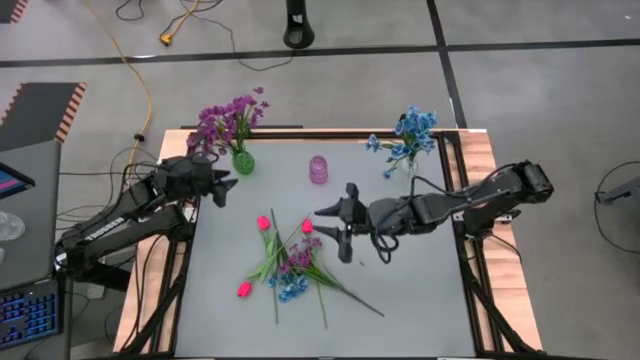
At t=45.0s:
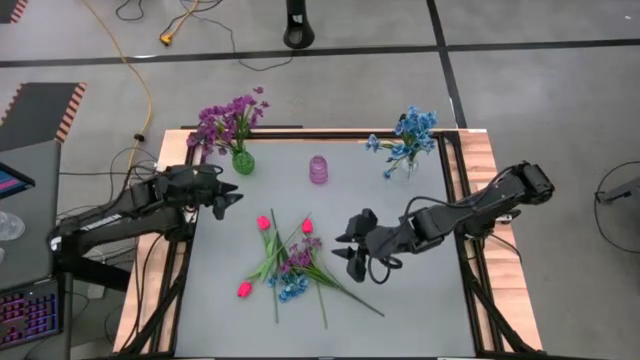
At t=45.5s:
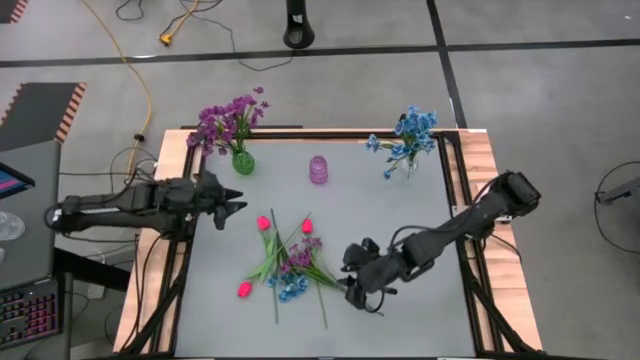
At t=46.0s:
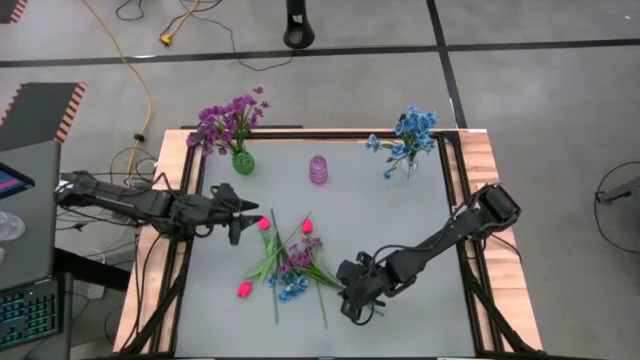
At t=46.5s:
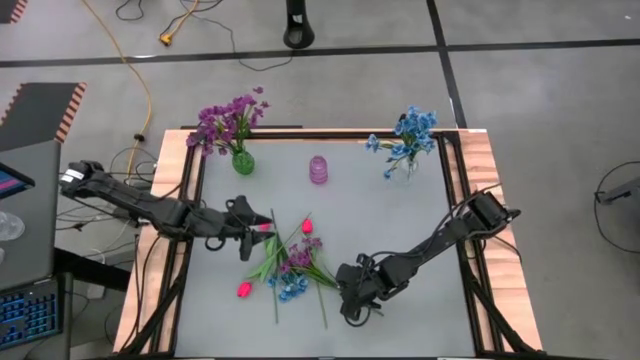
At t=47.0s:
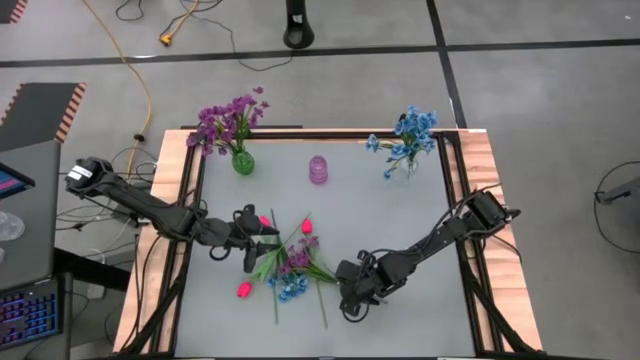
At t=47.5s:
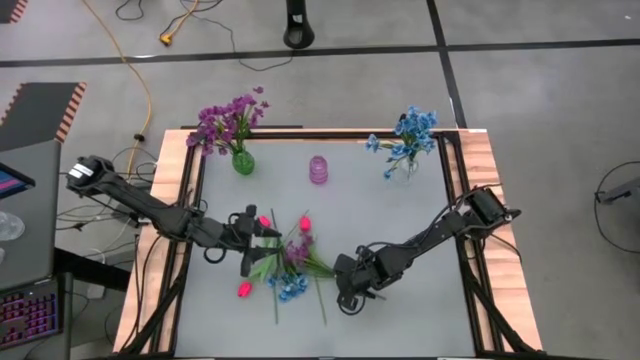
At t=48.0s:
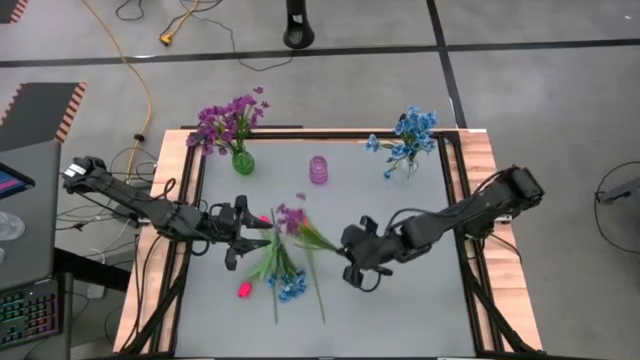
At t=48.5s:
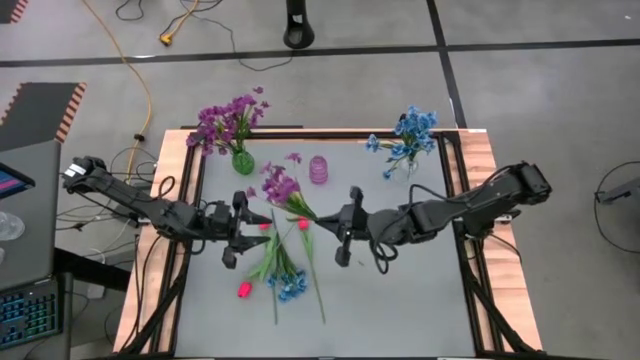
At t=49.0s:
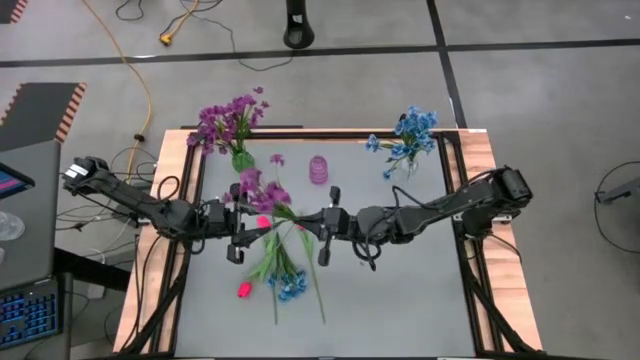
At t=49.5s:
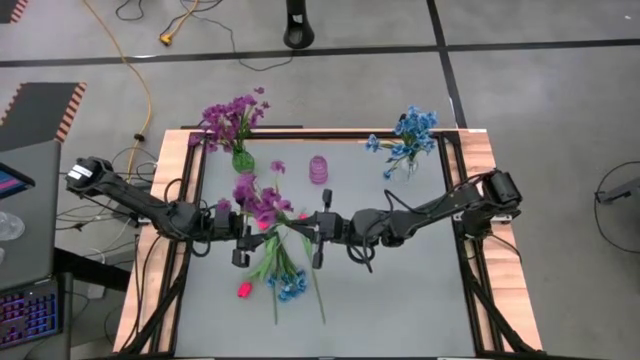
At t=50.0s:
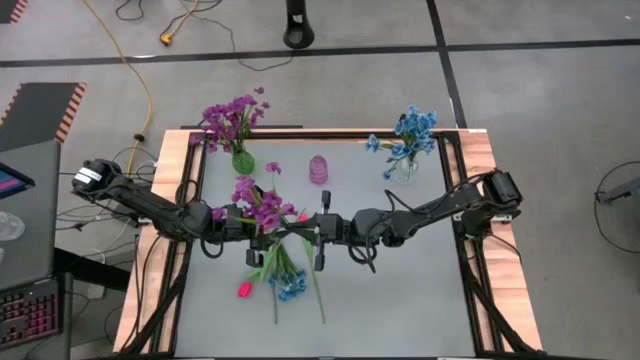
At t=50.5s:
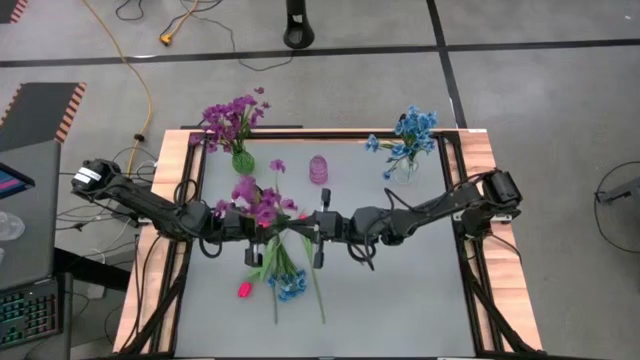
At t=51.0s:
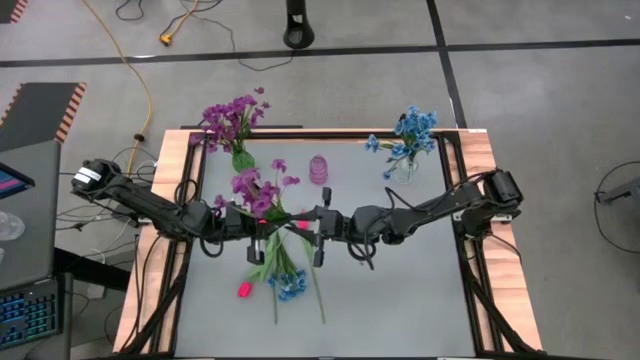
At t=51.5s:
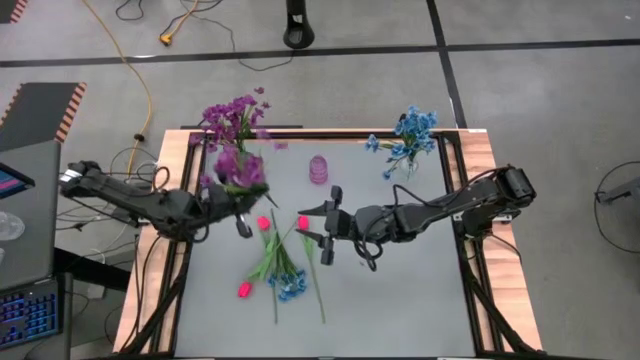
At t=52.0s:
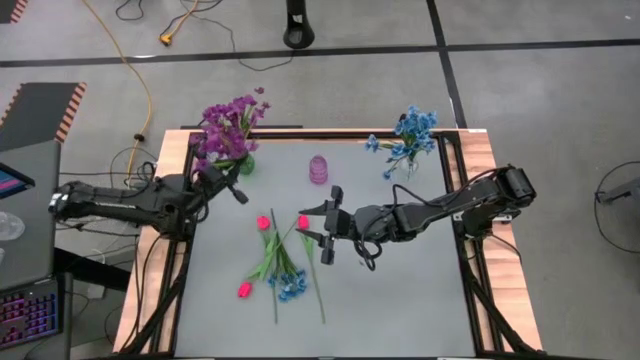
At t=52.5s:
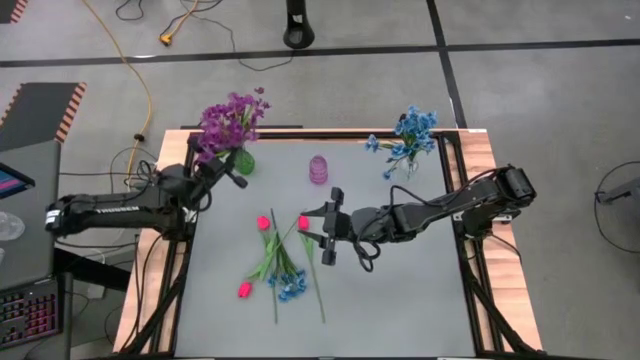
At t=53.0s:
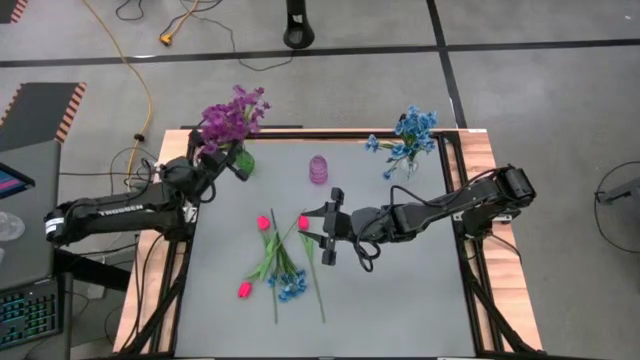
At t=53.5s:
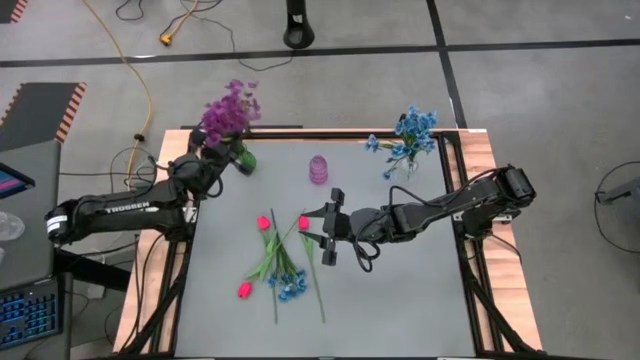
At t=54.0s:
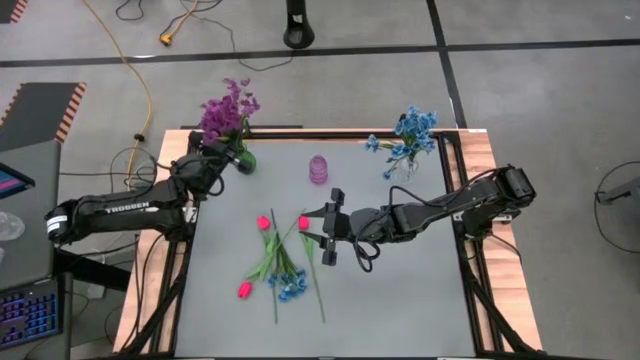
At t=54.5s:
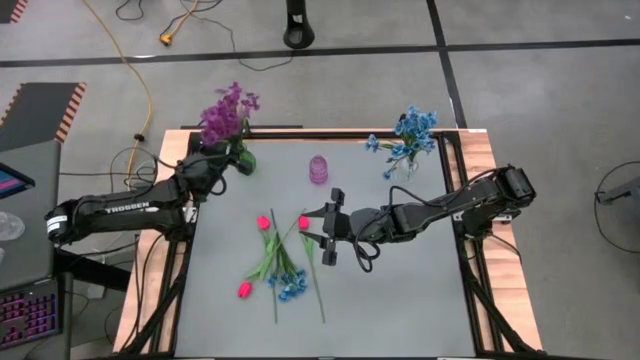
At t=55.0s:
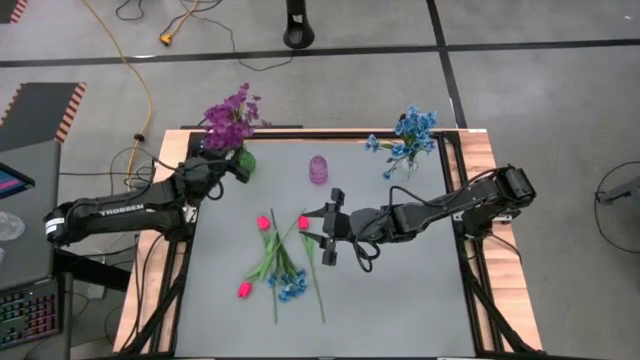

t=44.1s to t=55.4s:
Task: Sort flowers into vase by color
Put the purple flowers into the green vase

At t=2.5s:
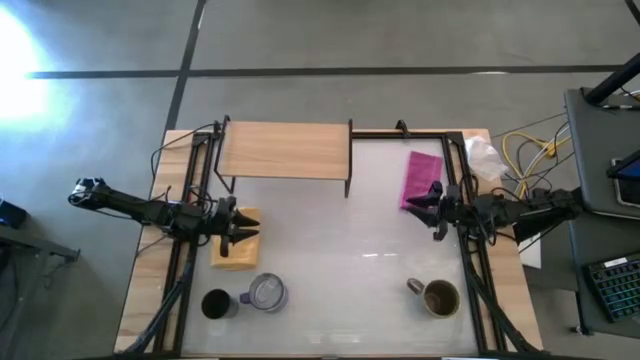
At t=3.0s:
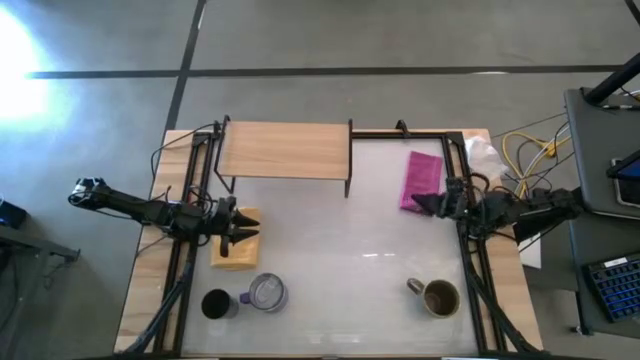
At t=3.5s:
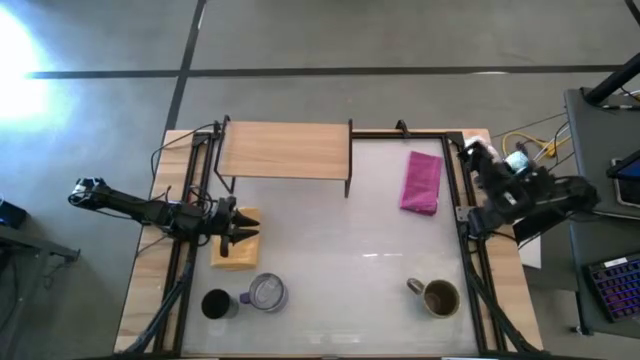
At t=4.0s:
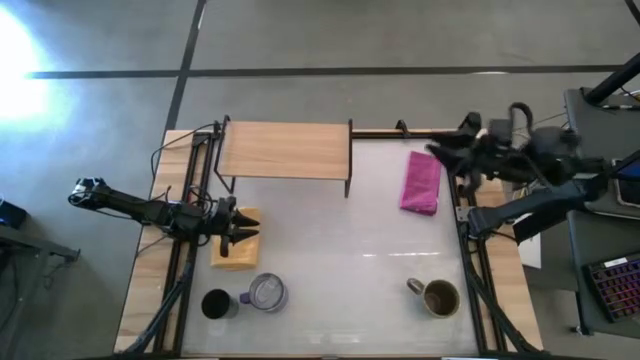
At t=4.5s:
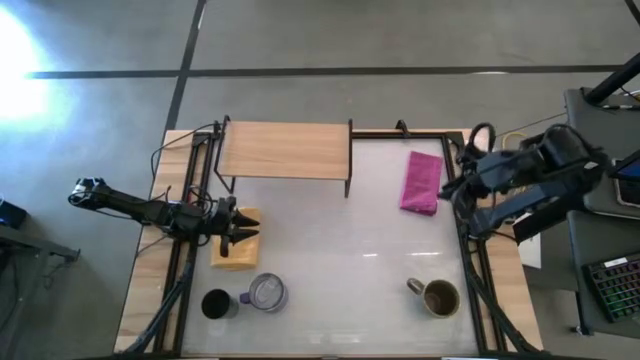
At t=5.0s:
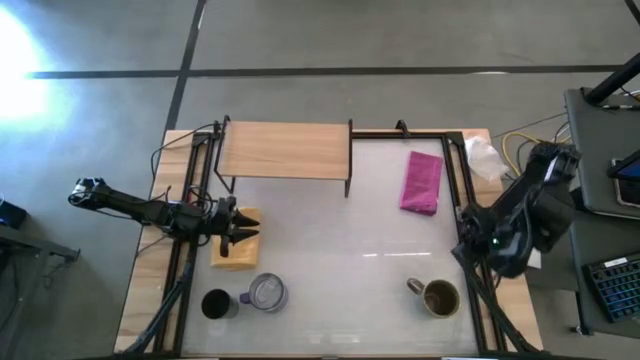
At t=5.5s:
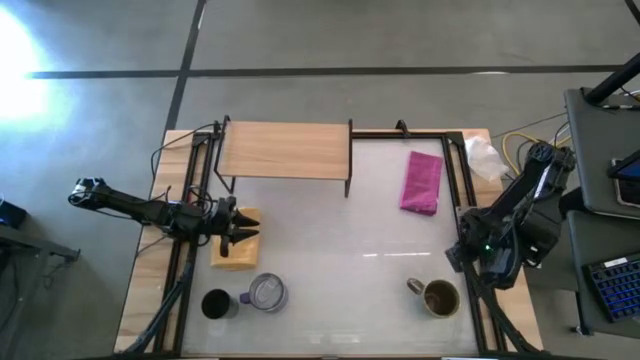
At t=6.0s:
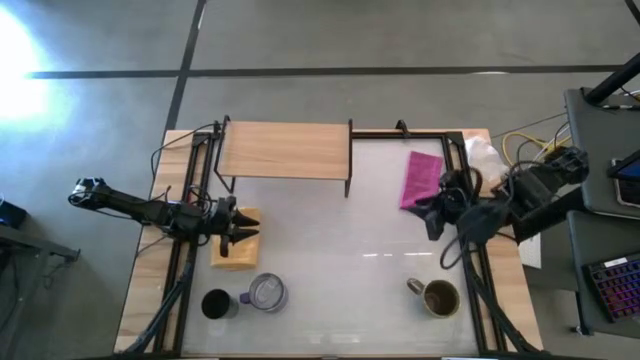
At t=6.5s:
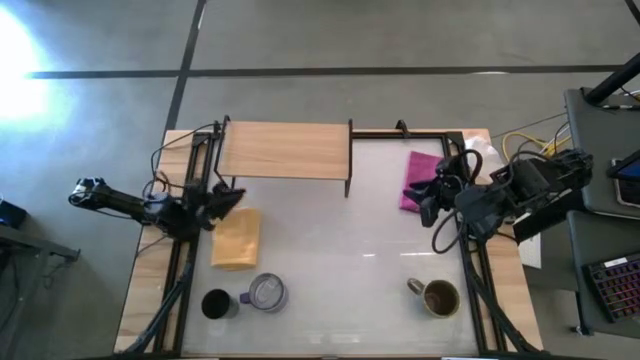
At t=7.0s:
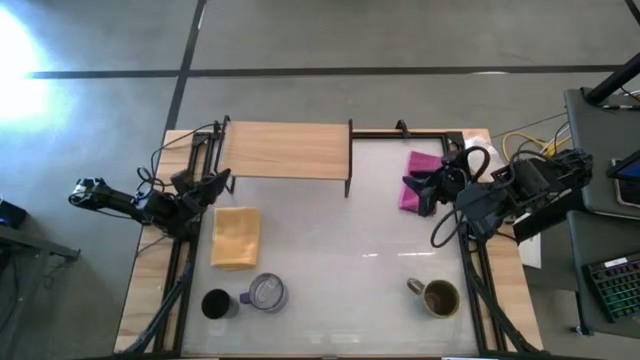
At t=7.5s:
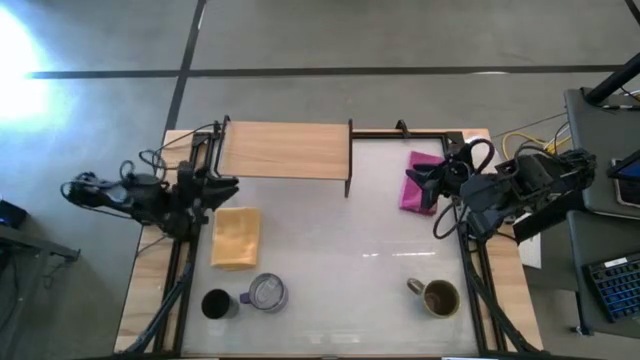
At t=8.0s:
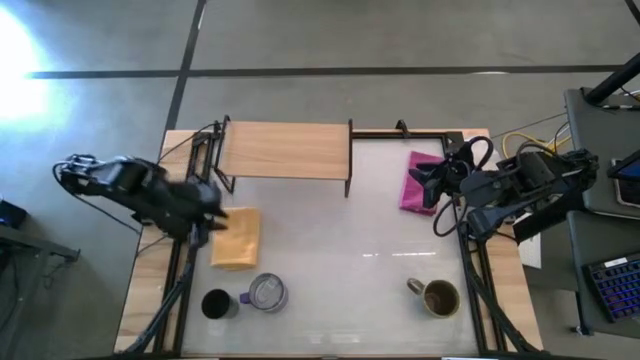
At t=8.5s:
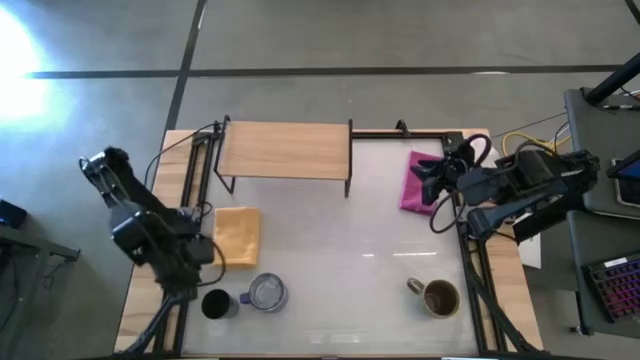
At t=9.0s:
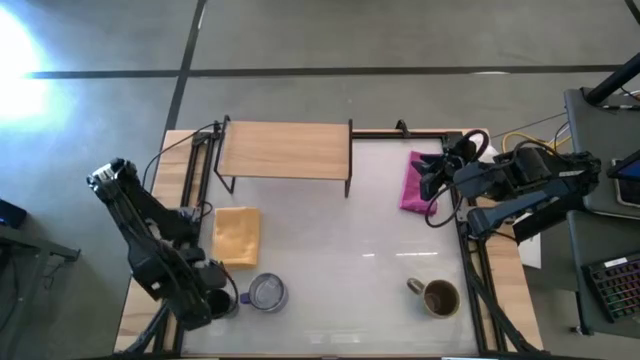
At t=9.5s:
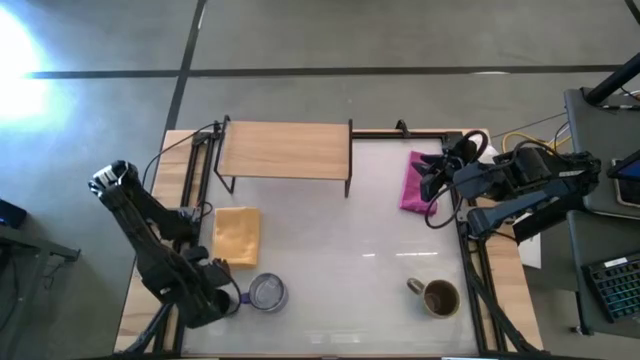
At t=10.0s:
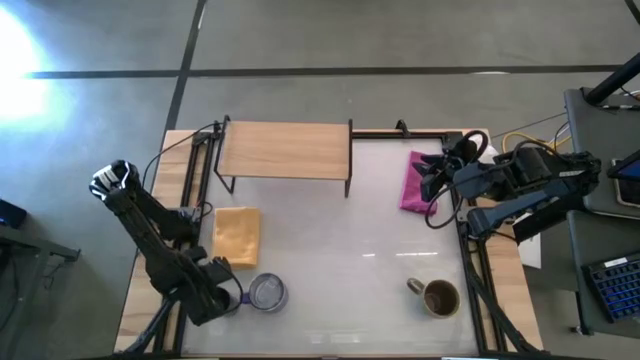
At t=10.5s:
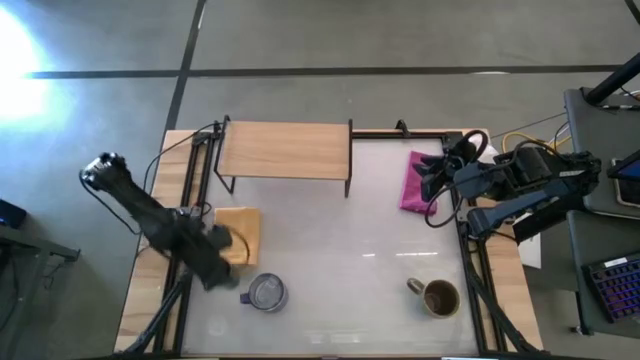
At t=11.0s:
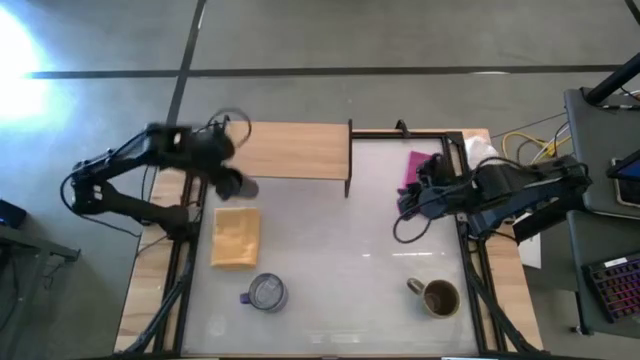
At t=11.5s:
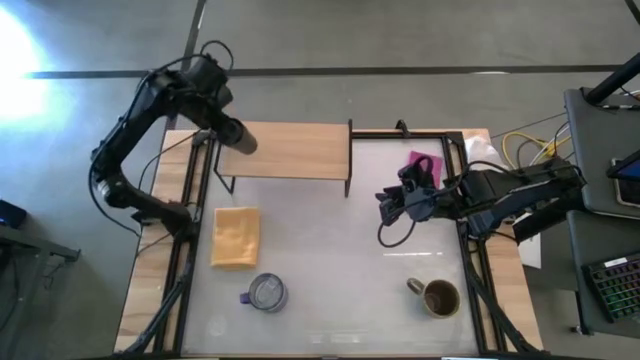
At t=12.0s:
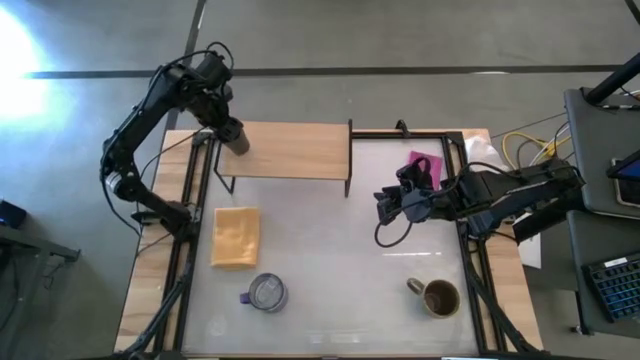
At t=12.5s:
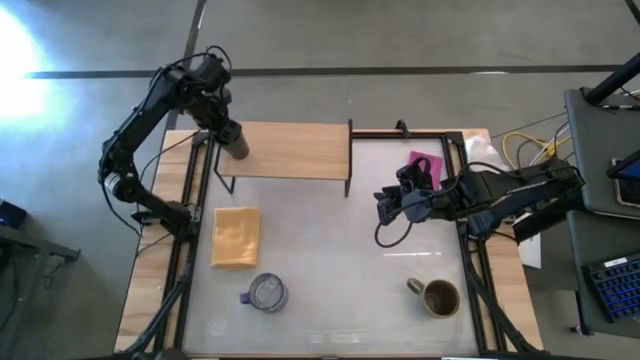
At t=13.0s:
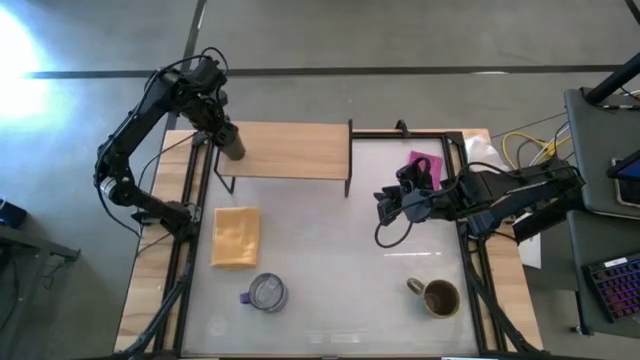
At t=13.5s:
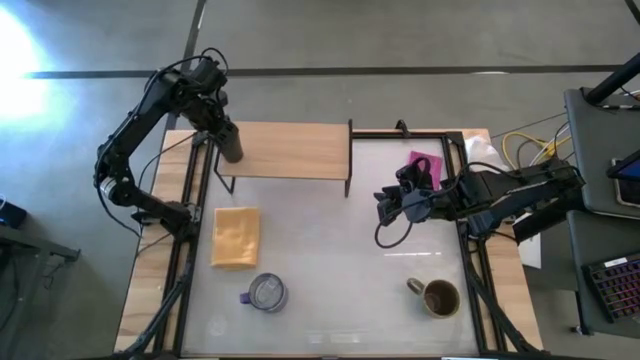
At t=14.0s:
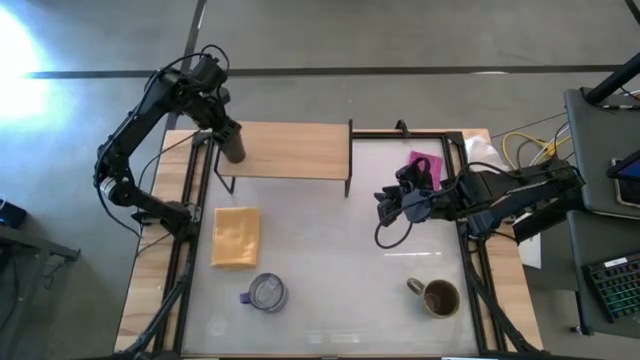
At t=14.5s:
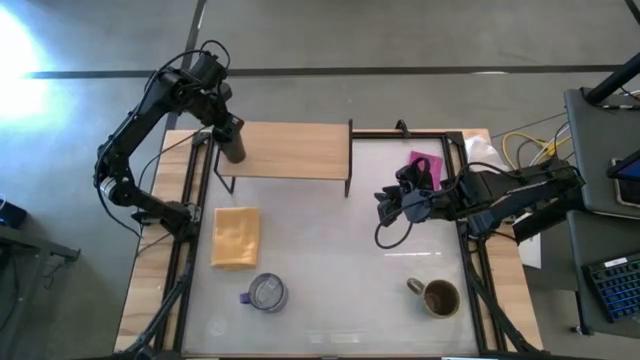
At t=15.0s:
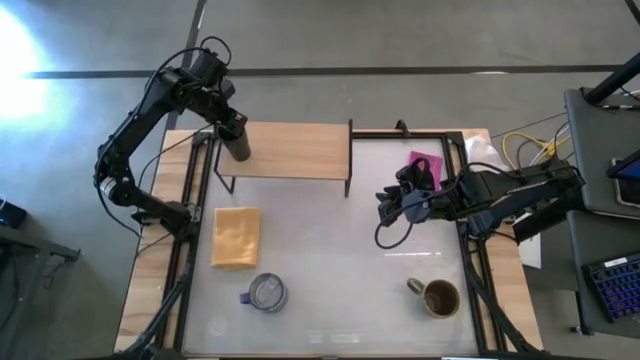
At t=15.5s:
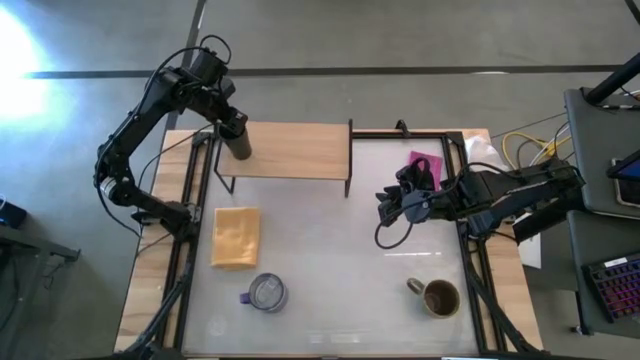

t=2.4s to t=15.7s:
Task: Stack small to large cups/mugs on shelf
Put the black cup on the shelf
